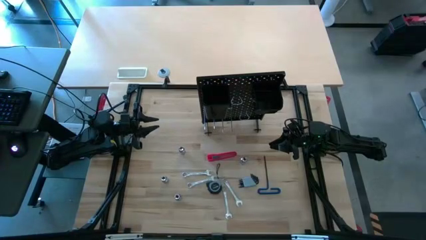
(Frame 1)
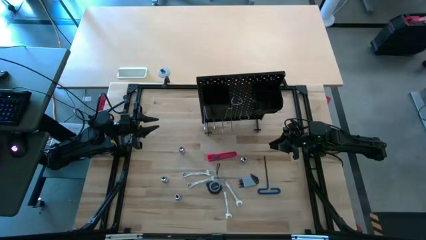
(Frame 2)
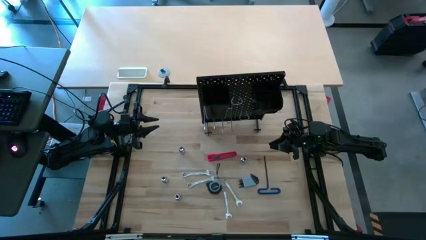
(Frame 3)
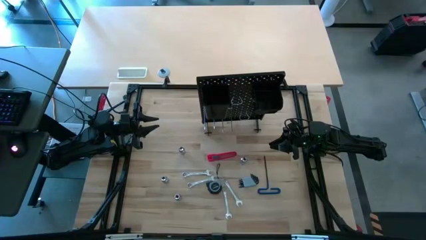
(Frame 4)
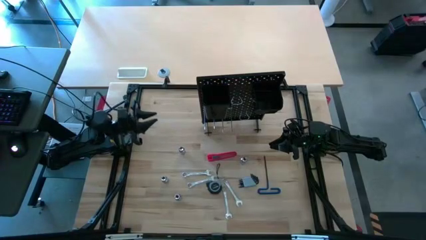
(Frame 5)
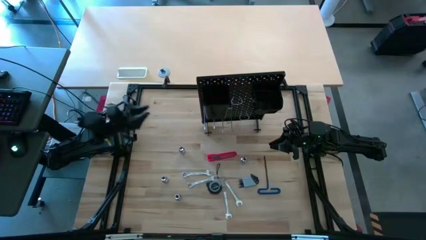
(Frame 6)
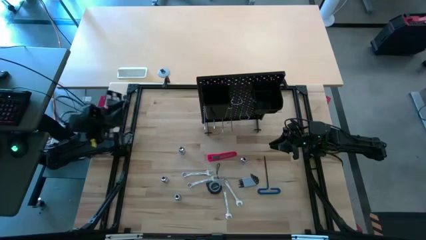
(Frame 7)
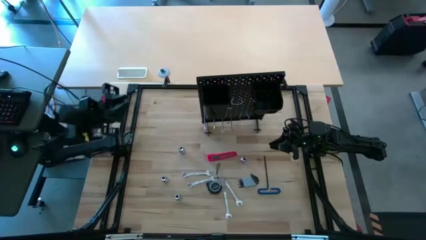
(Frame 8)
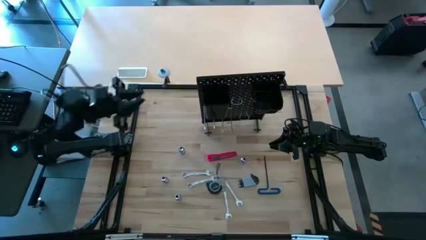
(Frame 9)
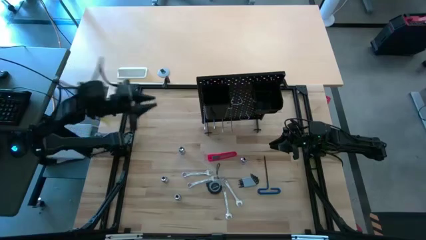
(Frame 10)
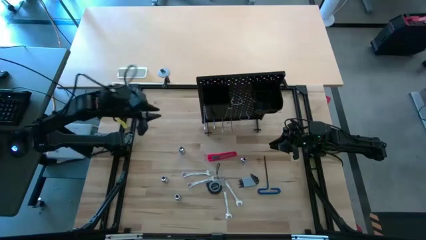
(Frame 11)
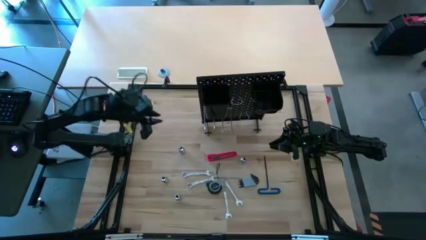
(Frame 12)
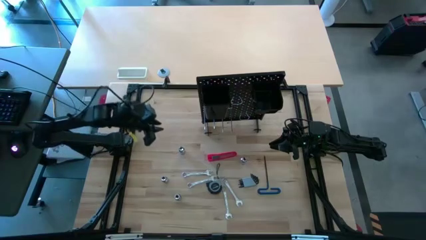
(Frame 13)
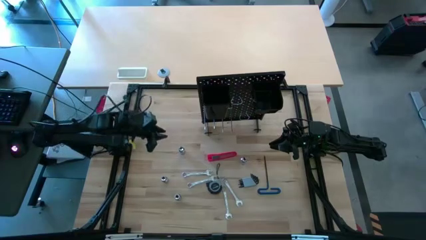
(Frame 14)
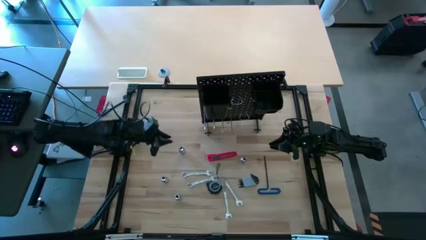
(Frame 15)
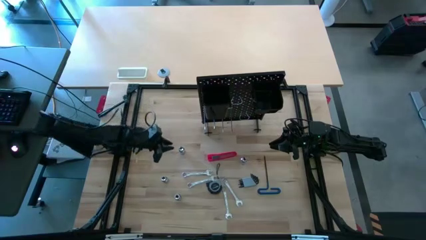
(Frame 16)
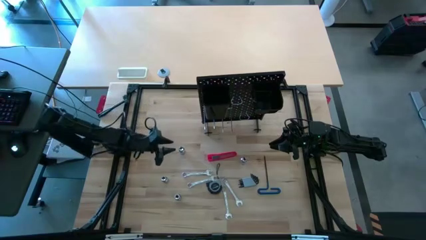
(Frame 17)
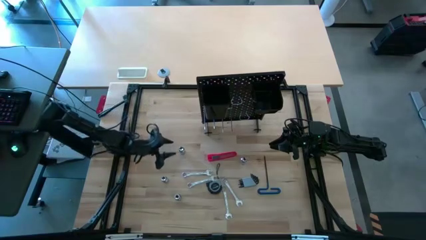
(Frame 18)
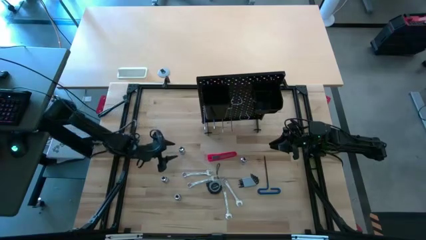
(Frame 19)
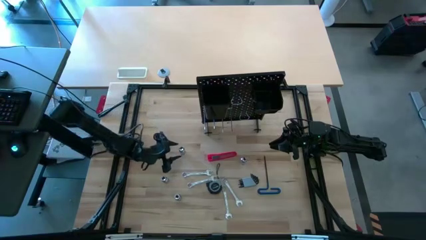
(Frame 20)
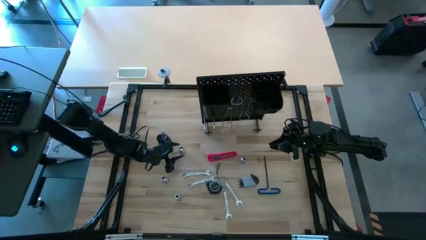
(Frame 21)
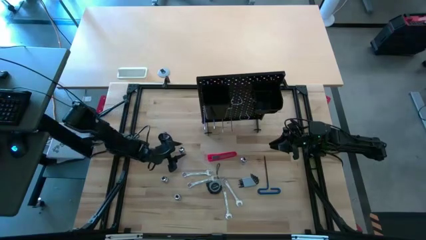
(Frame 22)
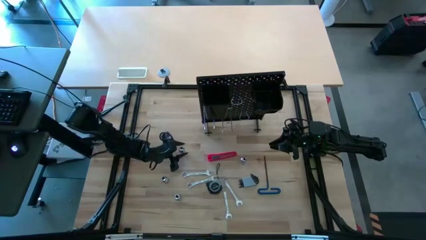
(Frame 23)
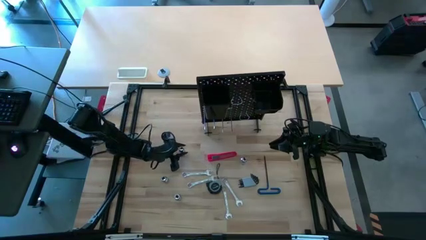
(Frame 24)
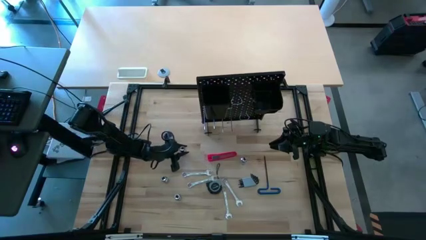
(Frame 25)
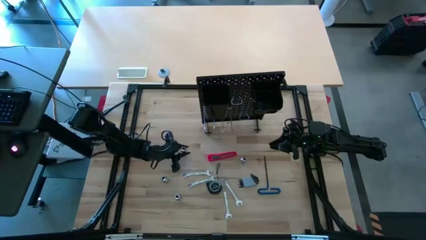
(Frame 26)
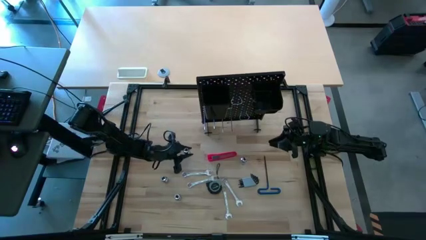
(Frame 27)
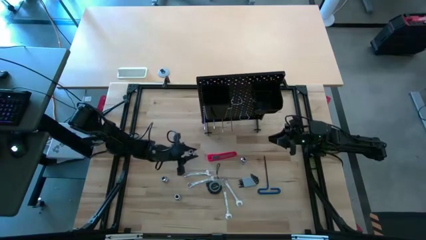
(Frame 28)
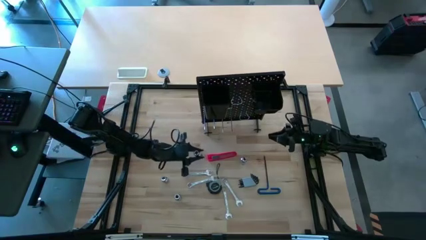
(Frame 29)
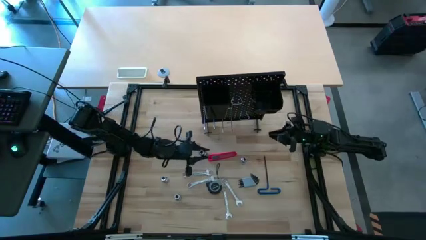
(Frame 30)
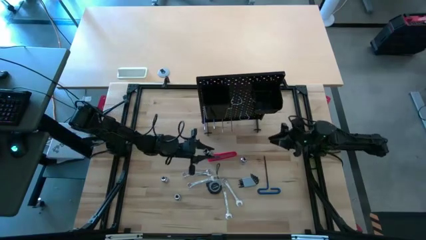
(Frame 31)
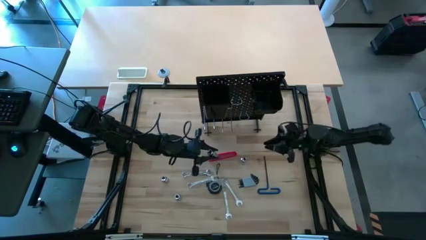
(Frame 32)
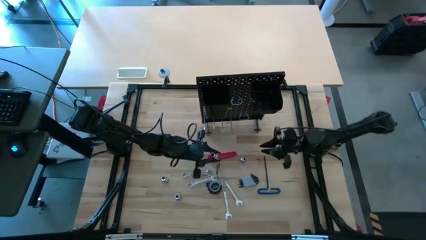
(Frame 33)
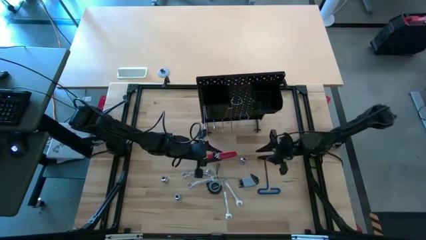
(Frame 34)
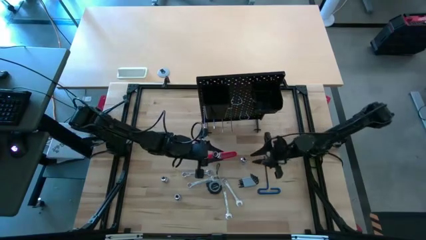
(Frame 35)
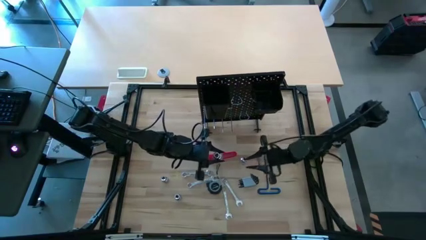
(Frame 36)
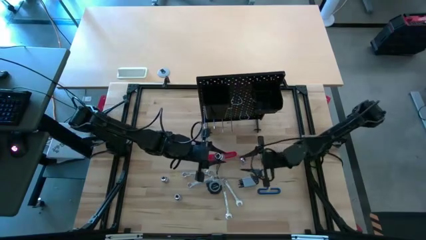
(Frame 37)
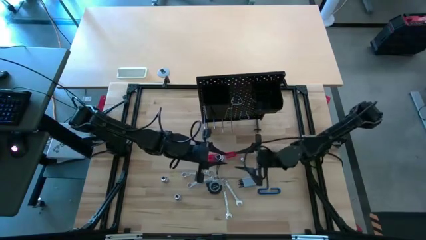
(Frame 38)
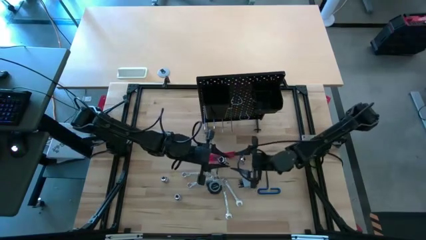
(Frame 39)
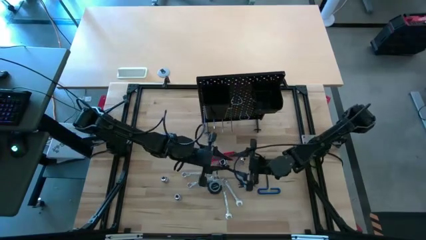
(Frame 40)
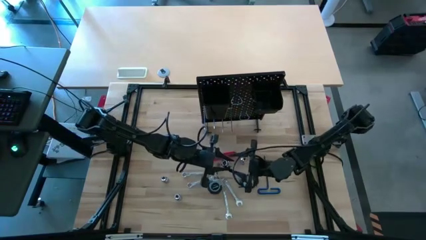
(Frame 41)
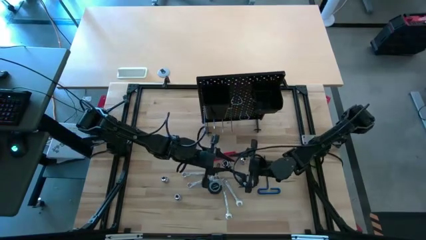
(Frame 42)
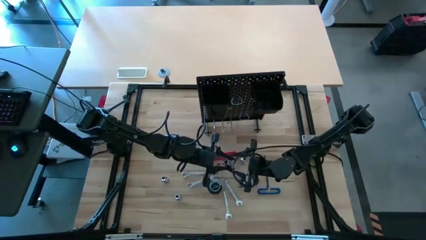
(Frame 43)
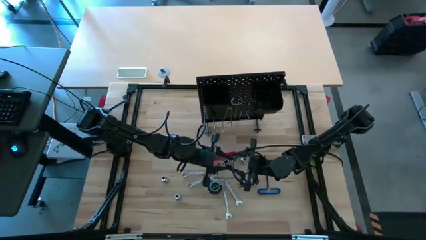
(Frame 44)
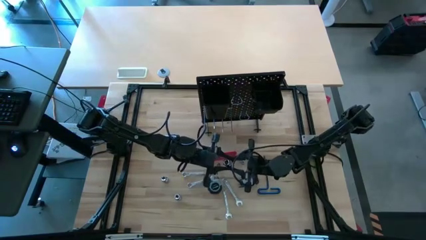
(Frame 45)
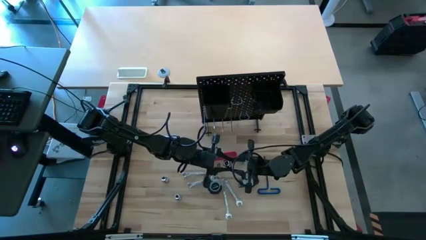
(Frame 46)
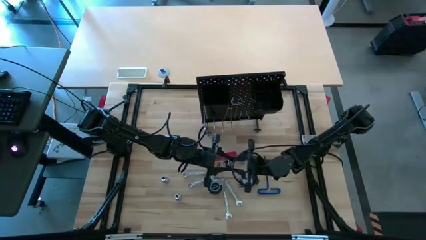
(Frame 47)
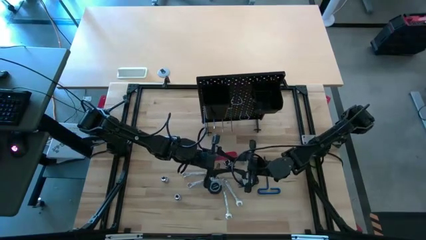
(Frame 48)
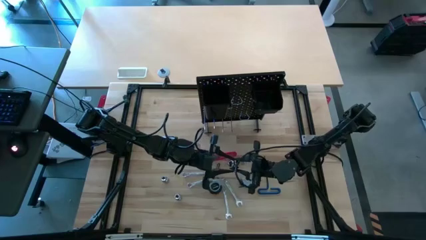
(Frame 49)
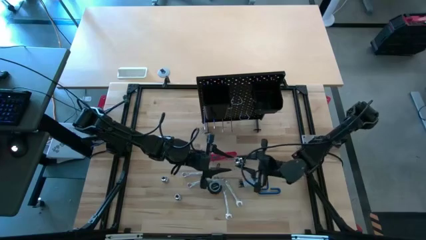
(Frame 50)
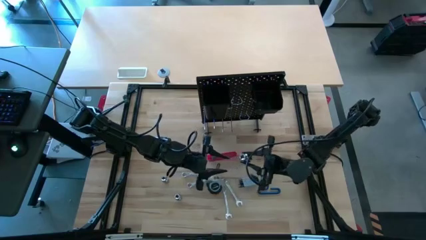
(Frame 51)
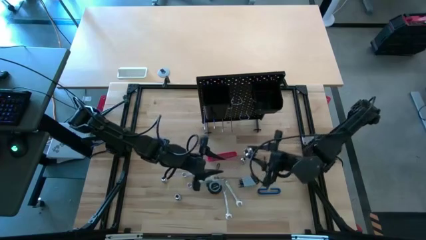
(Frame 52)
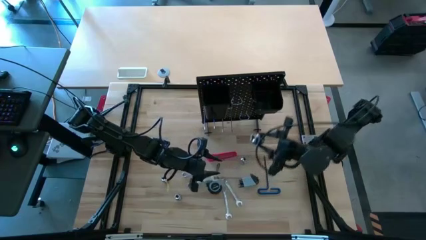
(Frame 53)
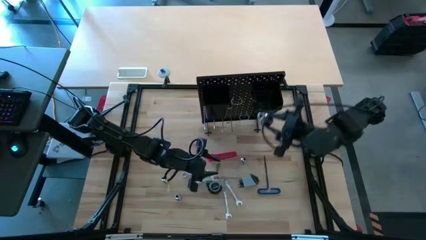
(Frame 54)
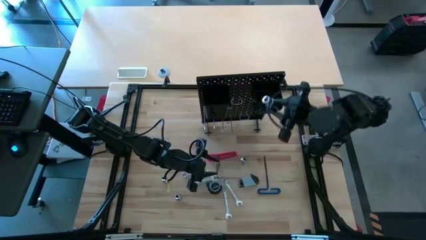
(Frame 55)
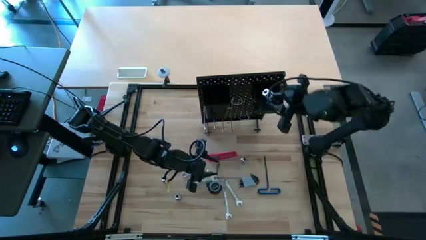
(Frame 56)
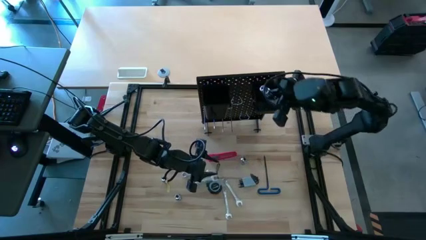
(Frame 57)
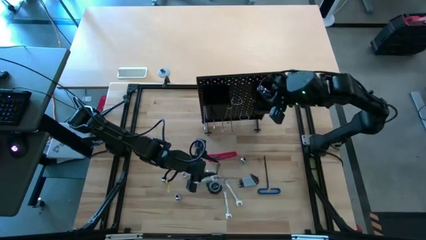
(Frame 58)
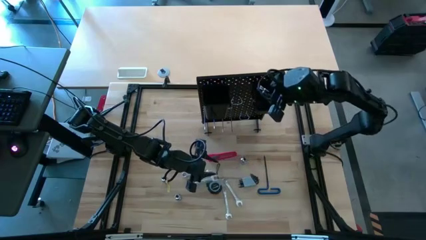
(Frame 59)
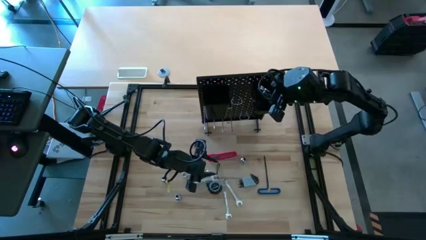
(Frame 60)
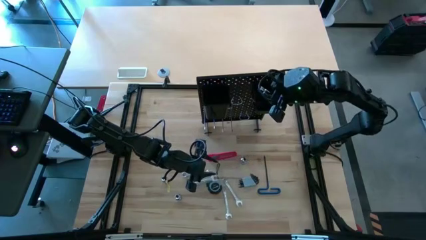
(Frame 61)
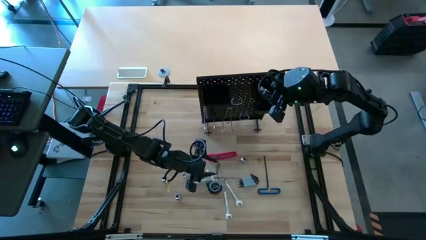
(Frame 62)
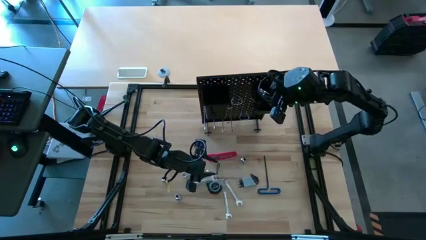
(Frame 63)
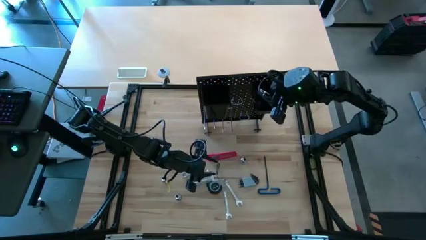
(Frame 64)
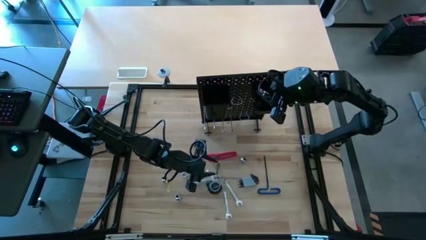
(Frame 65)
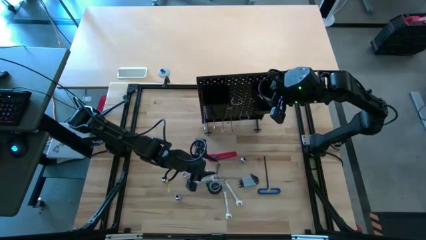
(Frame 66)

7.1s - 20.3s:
Task: Hang tools onto peg board
Put the top left socket into the peg board
